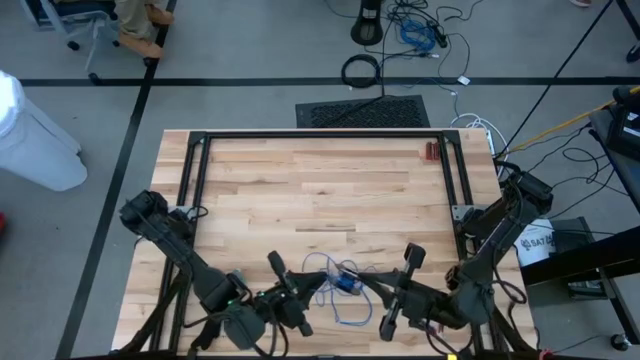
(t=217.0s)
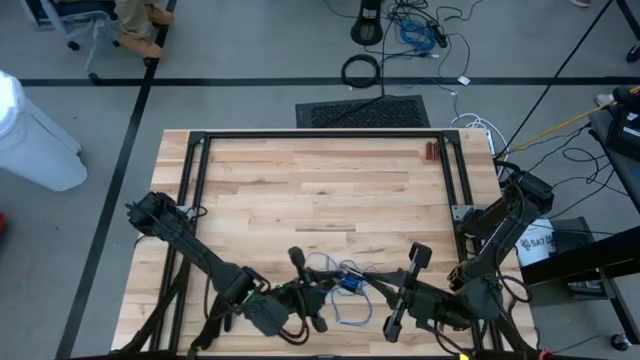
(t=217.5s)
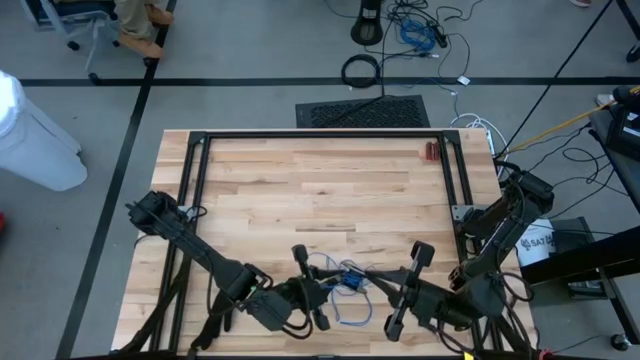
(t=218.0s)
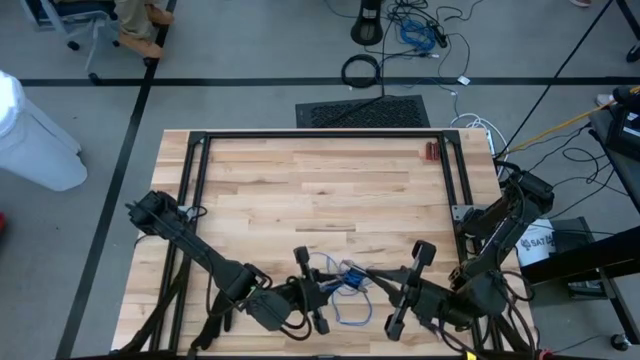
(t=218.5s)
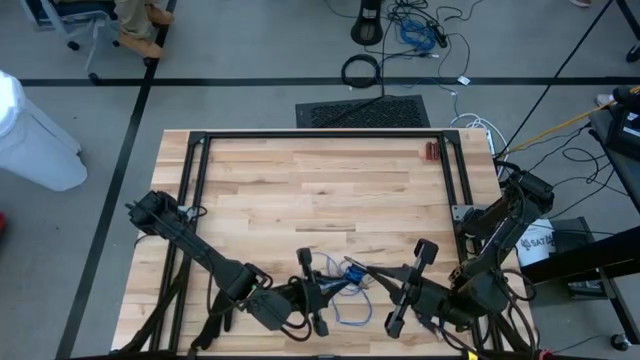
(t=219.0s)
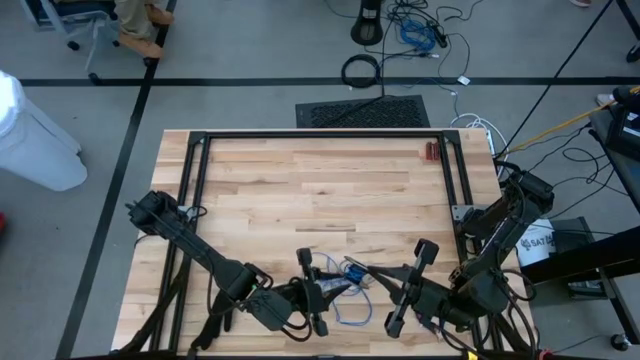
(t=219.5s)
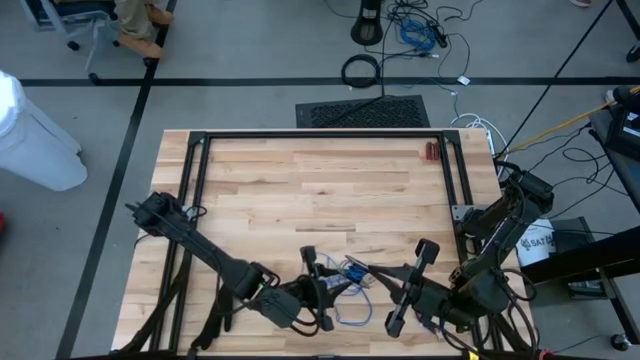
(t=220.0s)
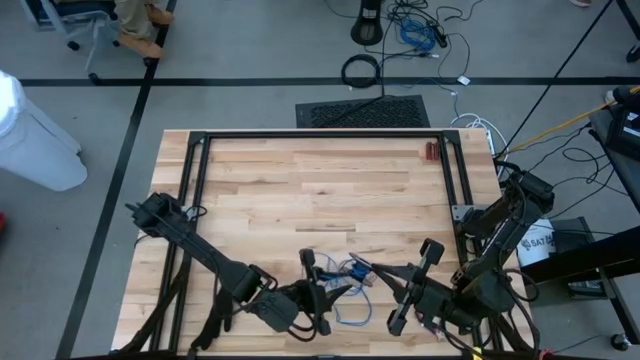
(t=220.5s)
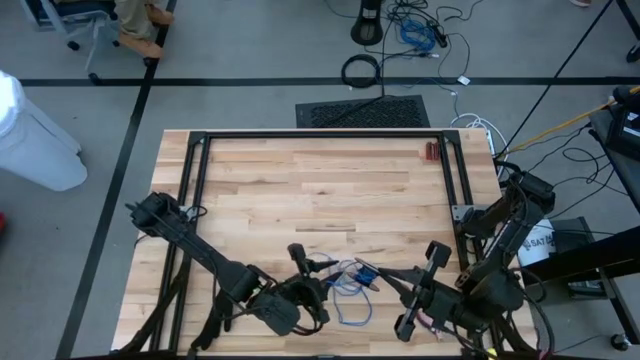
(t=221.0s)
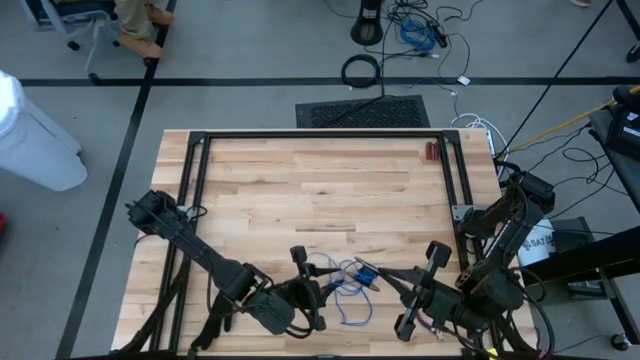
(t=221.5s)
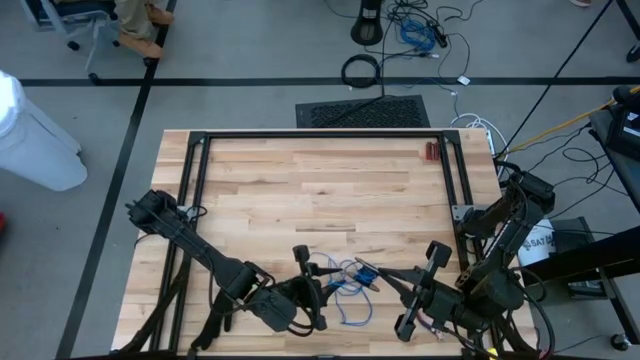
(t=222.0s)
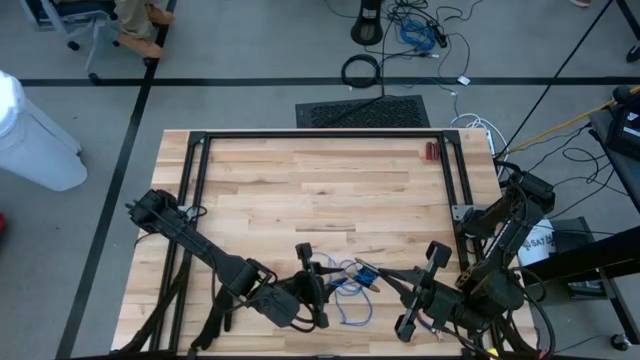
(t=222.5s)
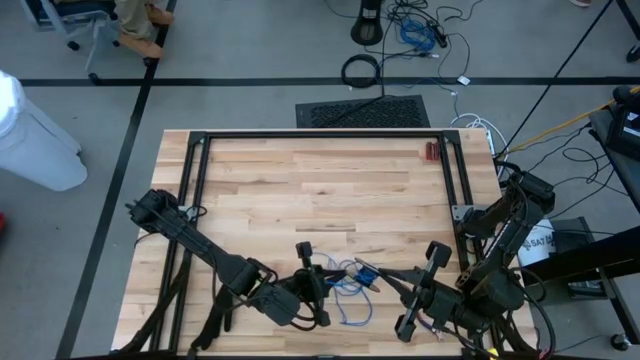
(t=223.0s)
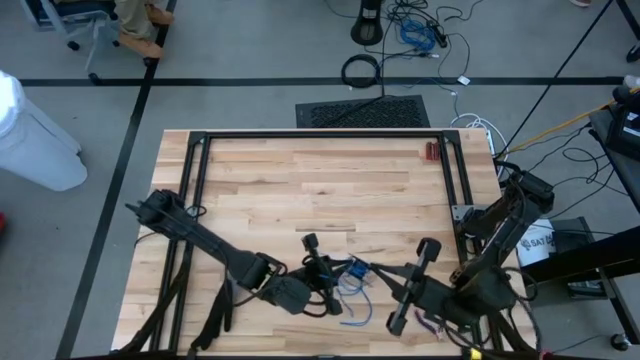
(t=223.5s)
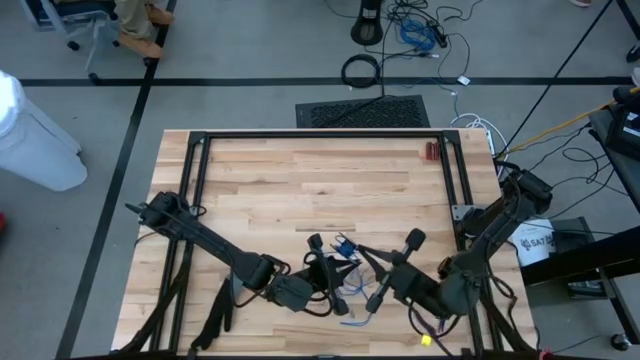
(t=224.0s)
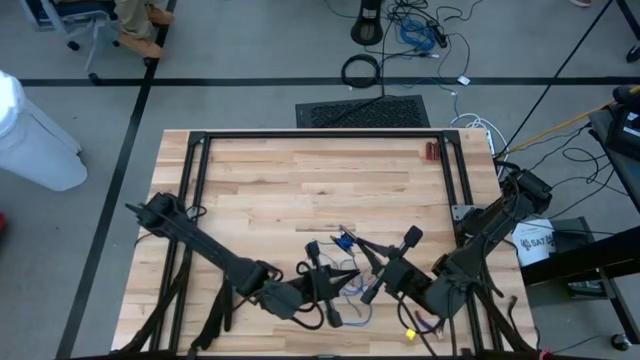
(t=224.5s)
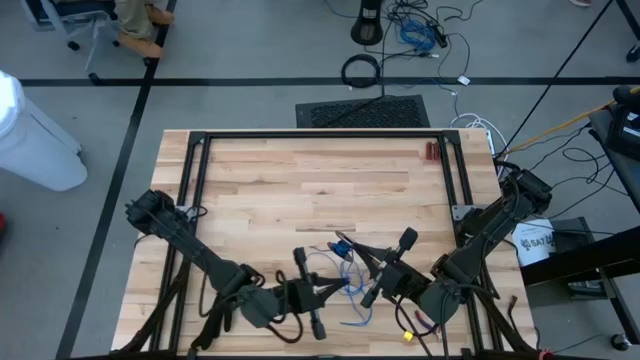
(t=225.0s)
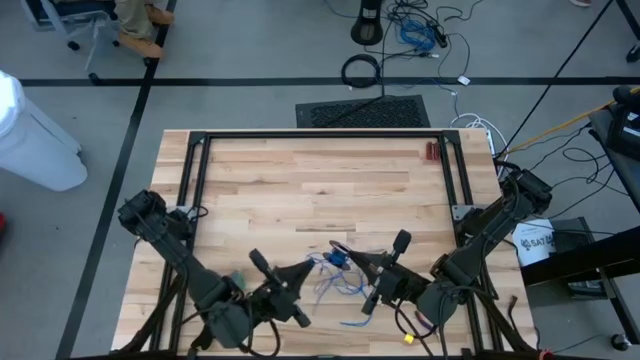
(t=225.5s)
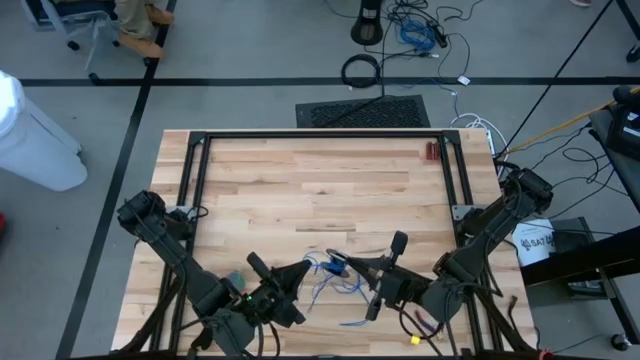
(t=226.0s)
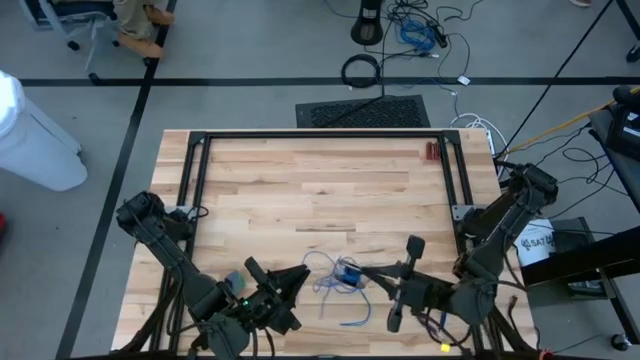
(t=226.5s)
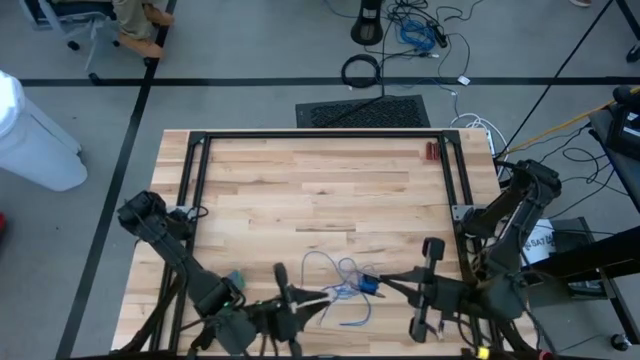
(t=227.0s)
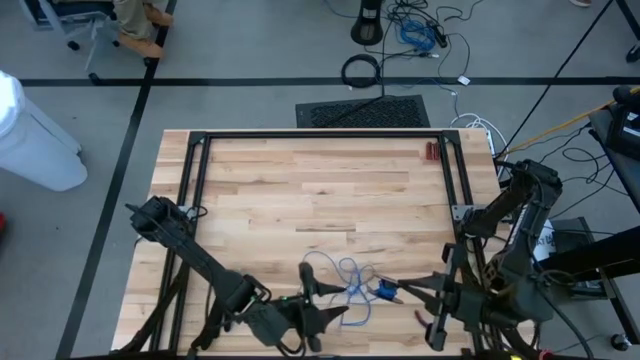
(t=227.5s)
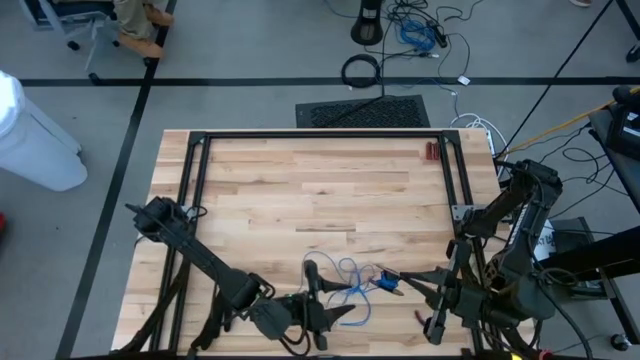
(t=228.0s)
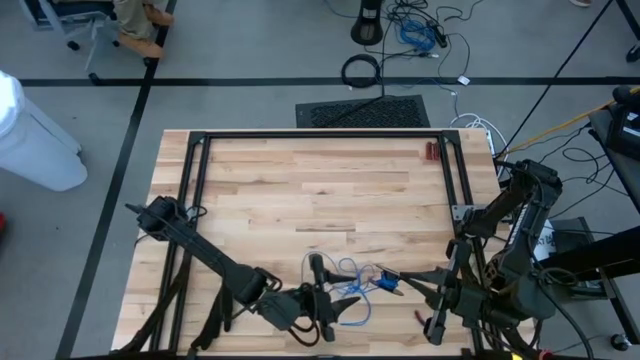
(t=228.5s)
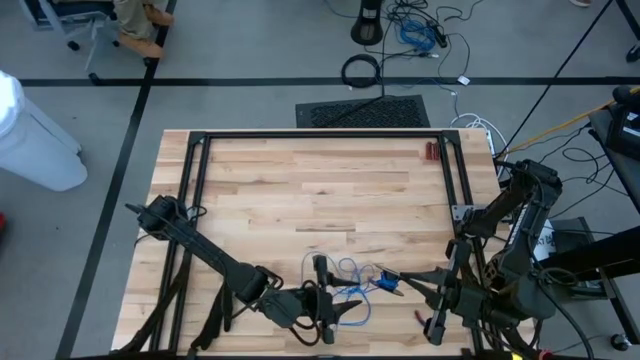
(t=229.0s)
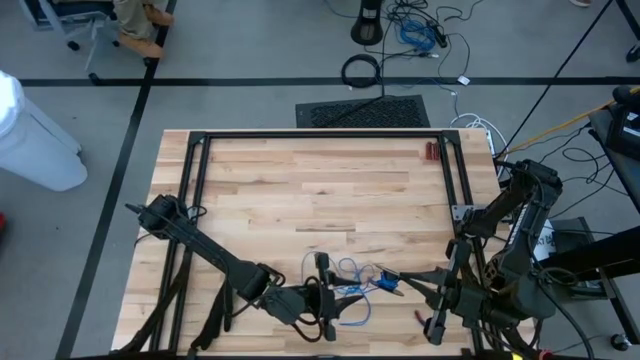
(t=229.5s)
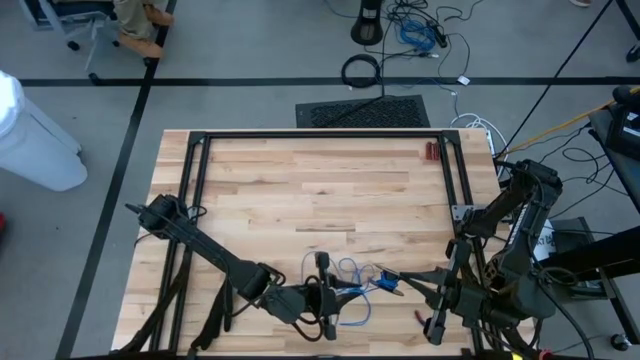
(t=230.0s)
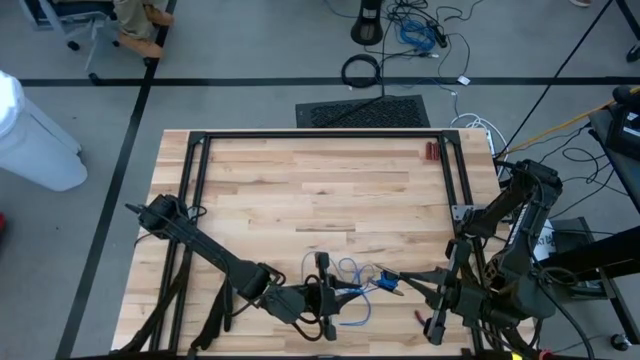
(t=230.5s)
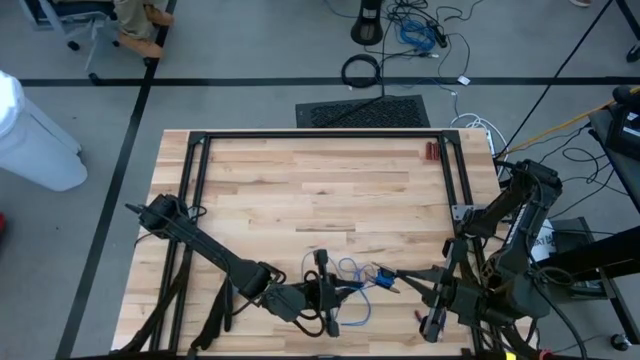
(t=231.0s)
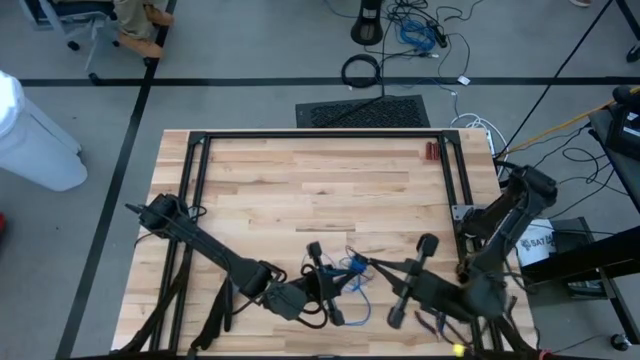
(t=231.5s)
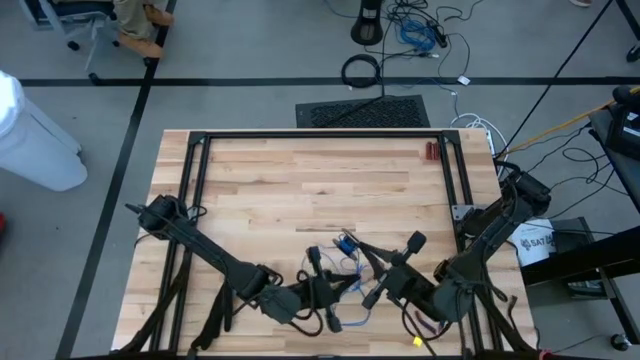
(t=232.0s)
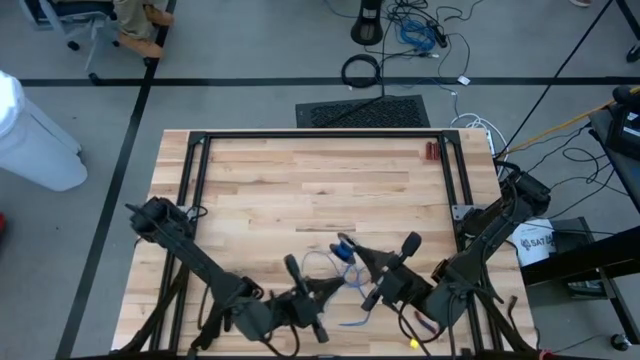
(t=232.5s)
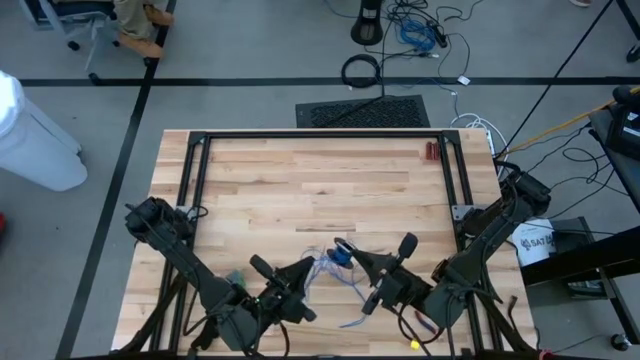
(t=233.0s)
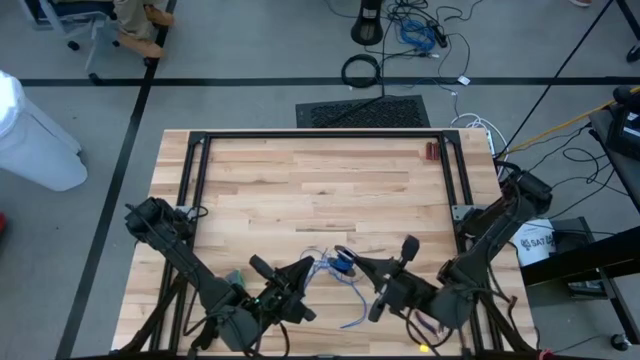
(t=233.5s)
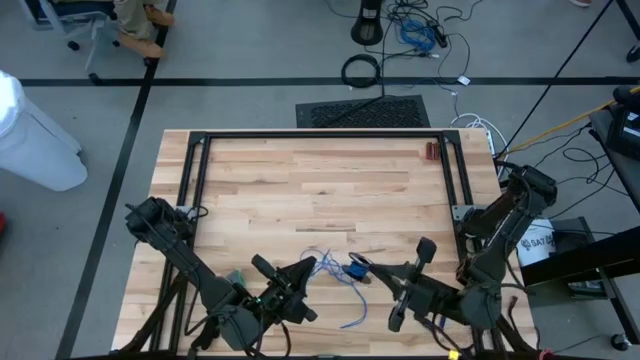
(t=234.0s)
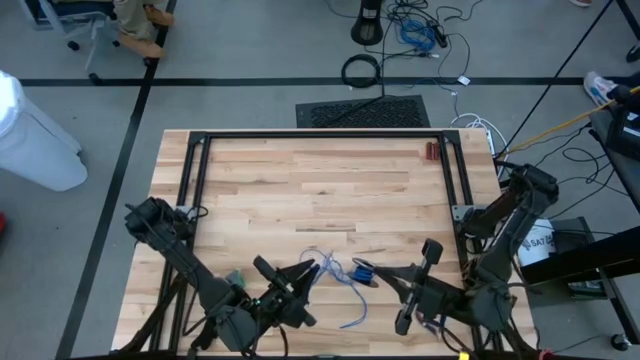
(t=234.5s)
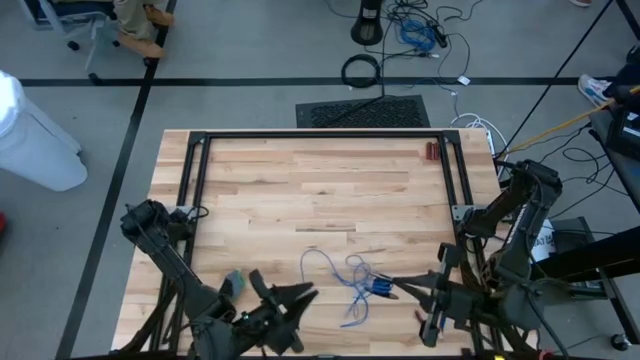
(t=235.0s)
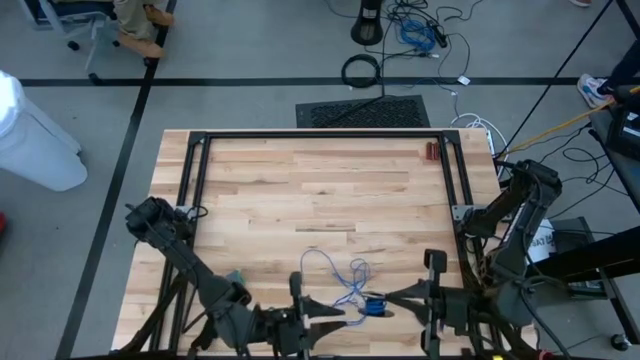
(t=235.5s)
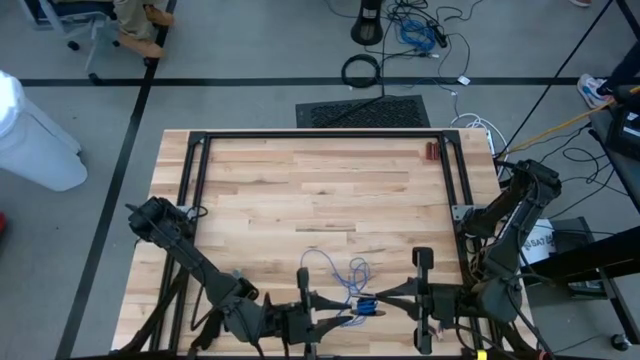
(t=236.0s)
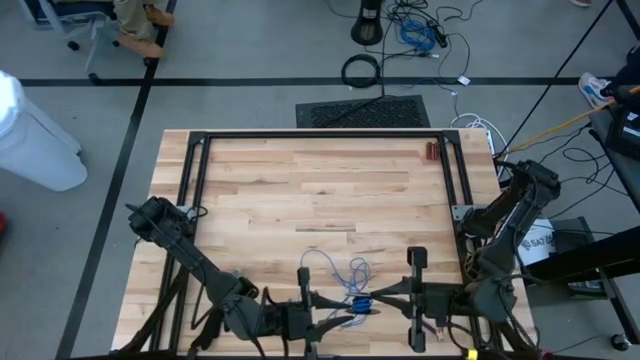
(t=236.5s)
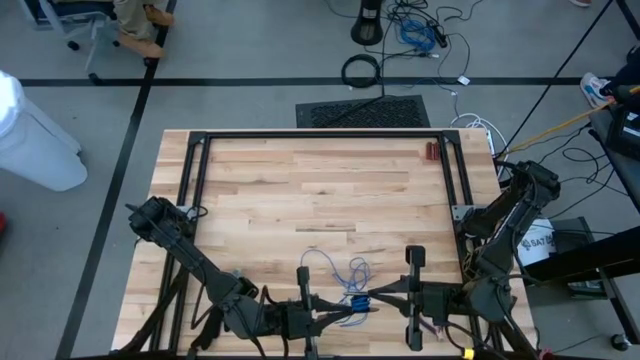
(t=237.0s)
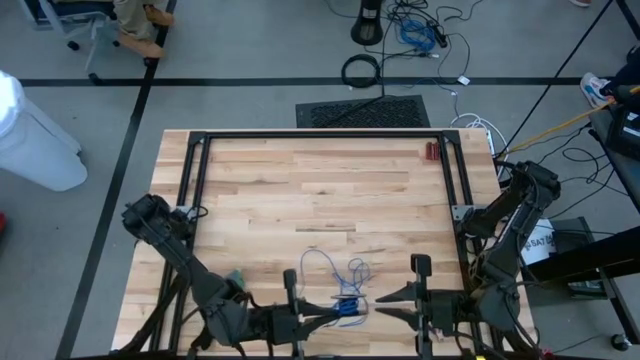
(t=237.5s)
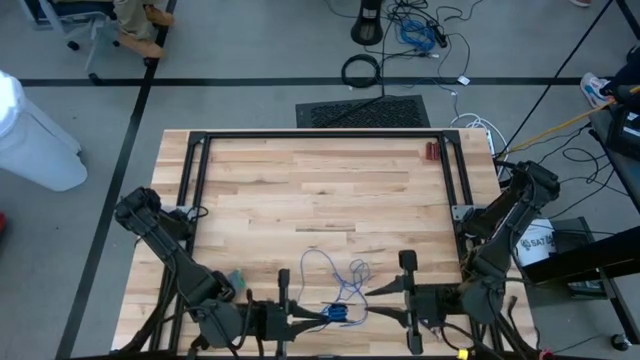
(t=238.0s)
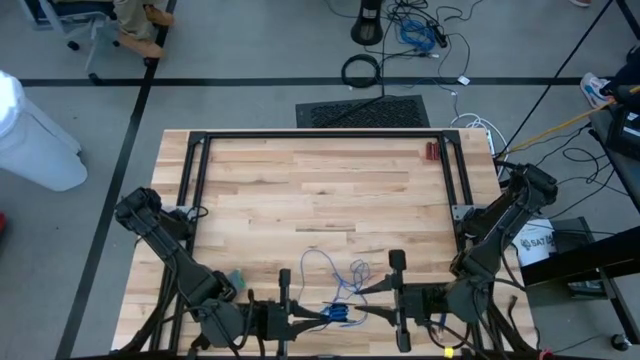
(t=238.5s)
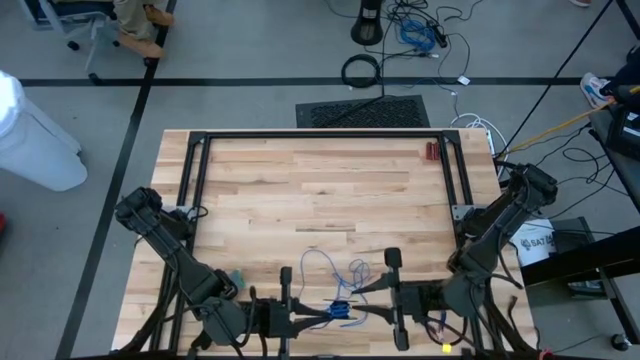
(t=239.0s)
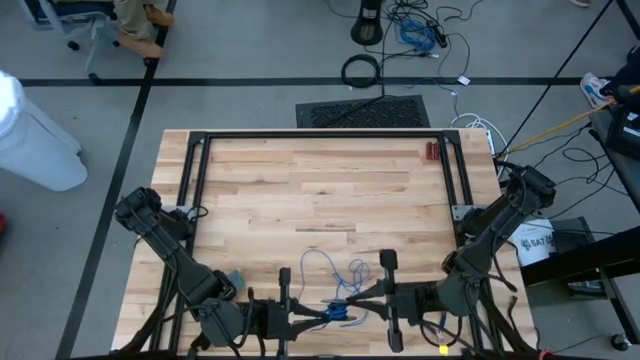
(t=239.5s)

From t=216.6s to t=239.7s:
Task: Coil cords
Coil the blue wire onto the black spool
